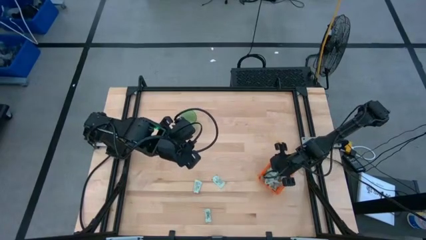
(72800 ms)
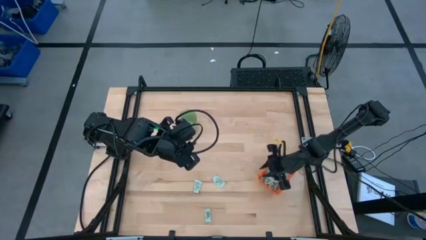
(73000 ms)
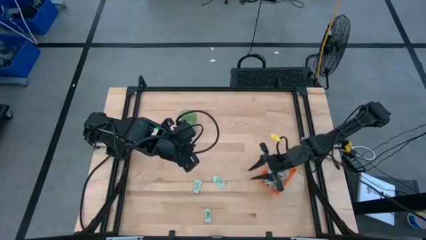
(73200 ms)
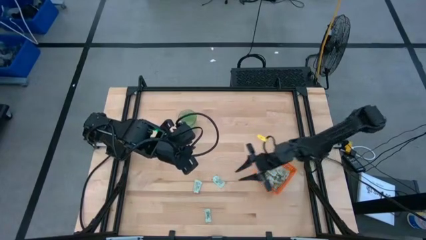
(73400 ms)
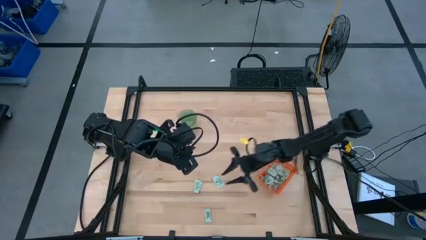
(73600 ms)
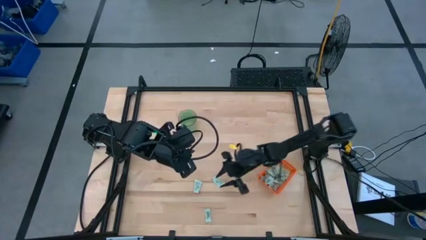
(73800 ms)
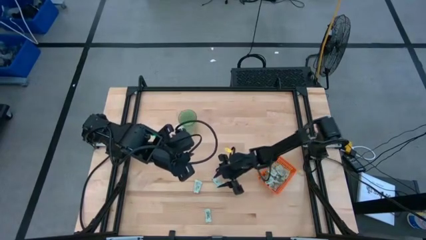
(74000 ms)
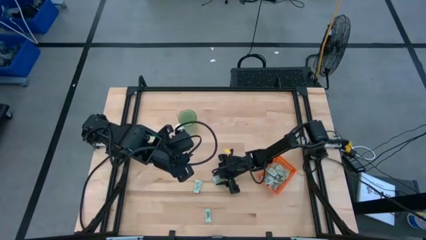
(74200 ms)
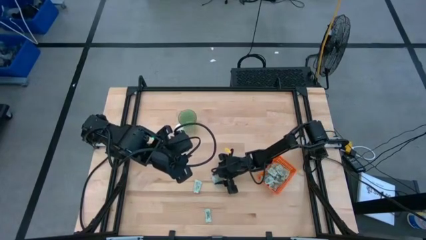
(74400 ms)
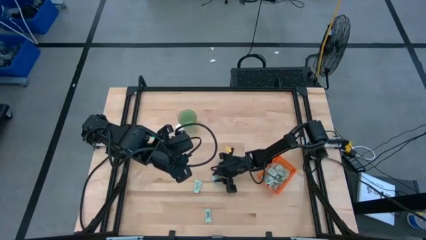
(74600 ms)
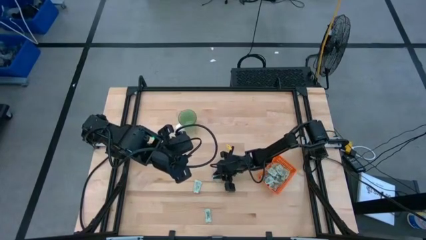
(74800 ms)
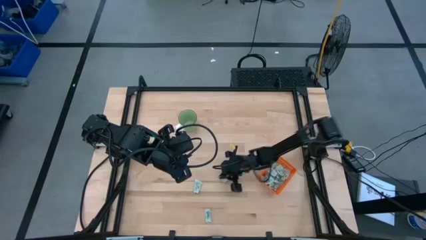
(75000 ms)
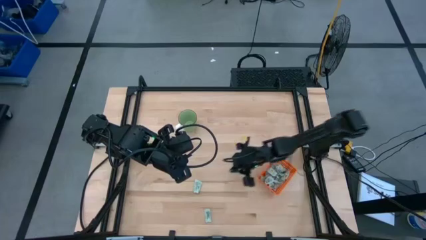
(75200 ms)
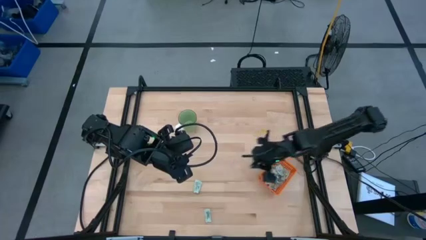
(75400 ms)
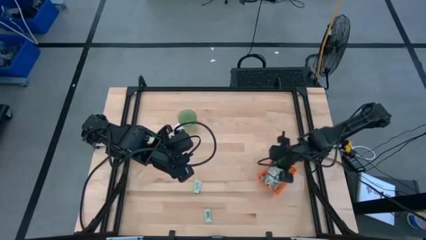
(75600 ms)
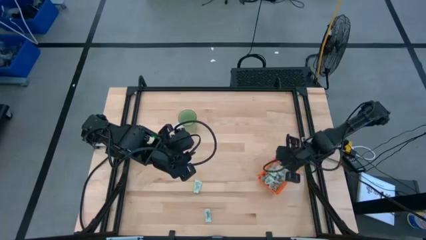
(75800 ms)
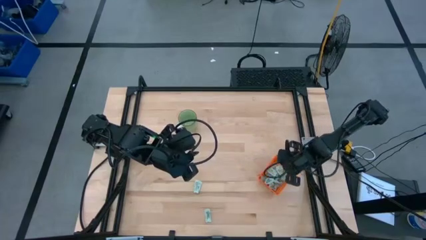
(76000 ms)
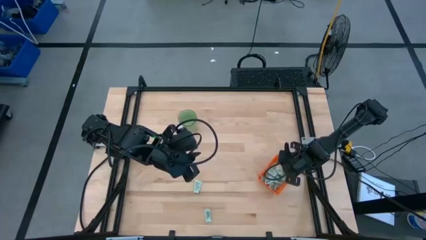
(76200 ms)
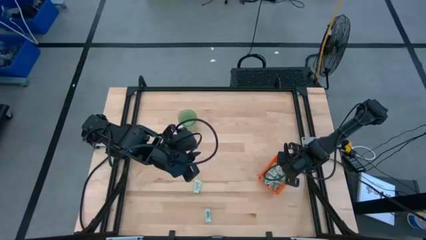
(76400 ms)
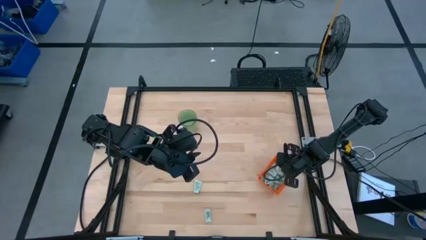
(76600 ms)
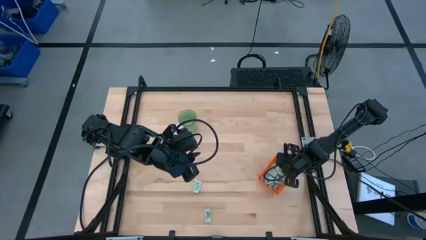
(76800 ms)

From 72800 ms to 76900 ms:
Task: Pick and place Stevia / Truvia into bins
Put the stevia packet into the orange basket

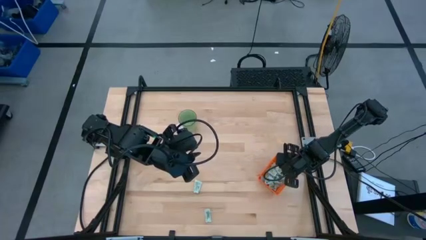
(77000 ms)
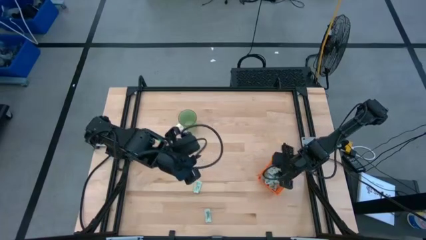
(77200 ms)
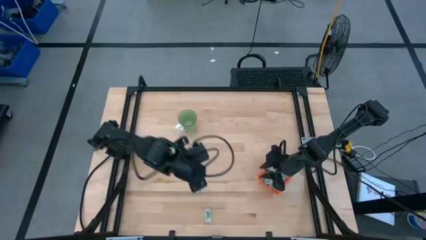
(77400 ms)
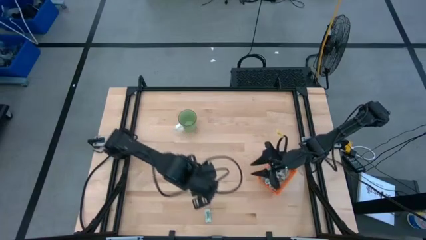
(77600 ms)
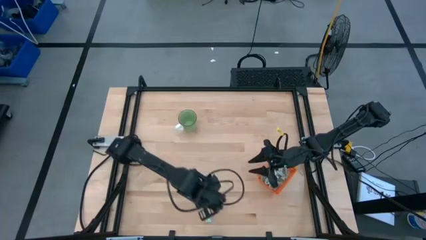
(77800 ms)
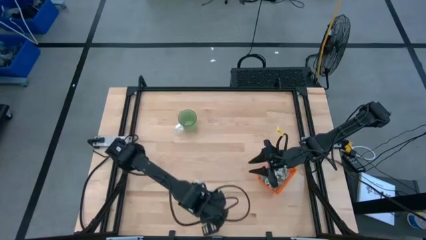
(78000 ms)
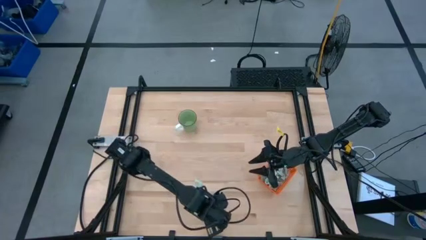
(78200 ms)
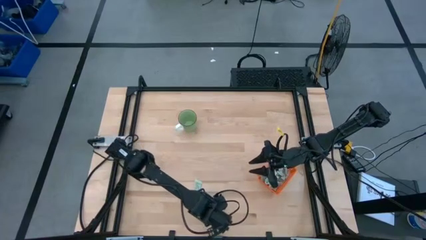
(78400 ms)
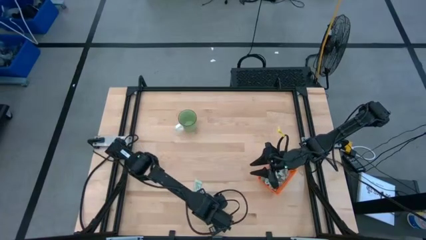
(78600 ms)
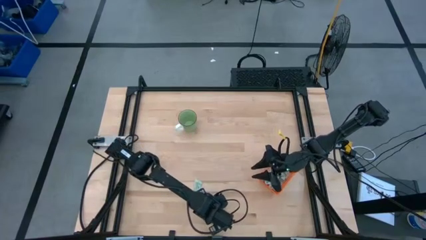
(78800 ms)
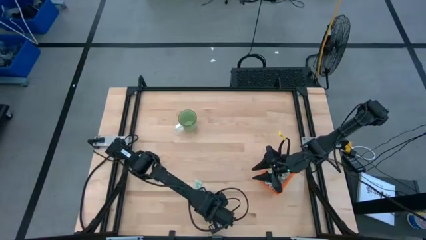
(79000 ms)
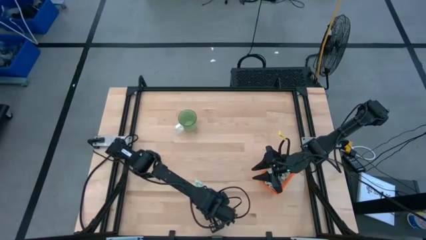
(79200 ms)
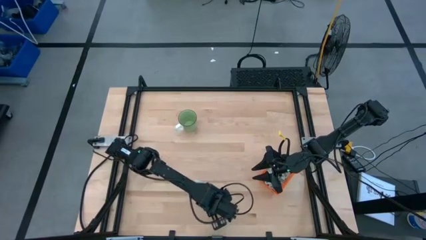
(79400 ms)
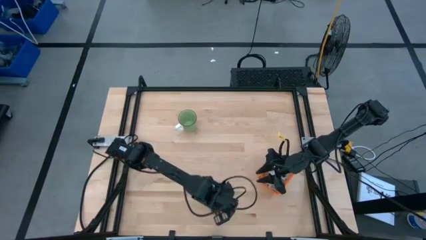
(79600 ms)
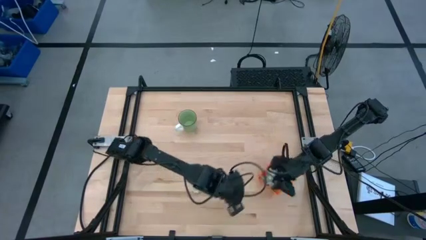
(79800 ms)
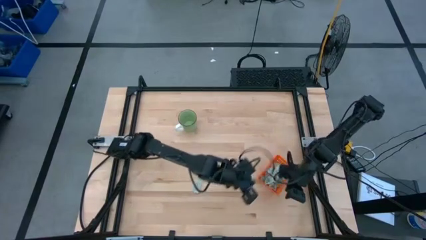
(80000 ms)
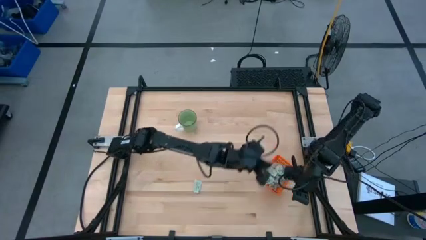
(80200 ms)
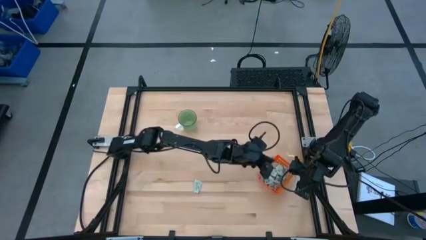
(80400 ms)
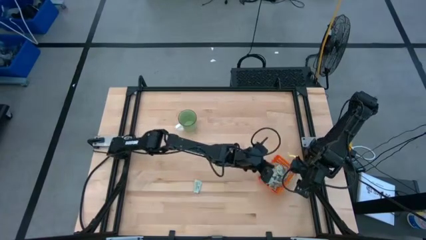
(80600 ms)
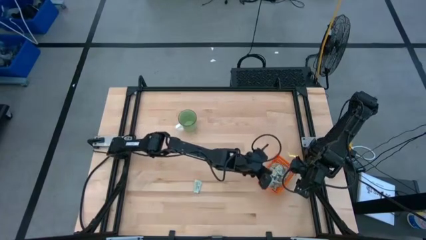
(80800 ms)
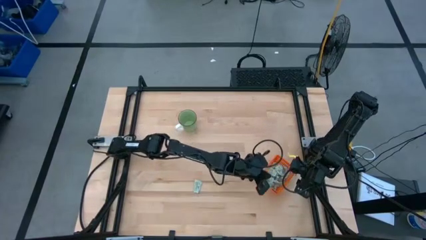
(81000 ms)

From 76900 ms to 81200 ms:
Put the stevia packet into the orange basket

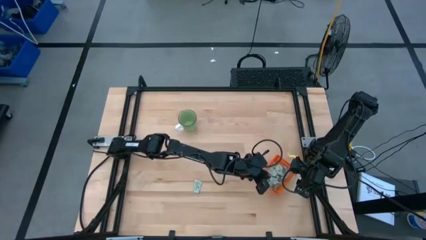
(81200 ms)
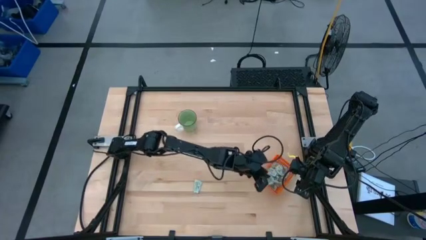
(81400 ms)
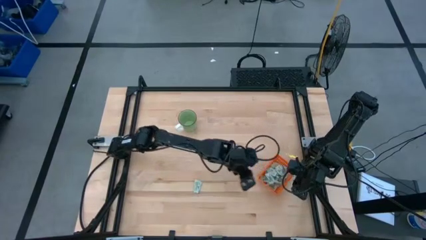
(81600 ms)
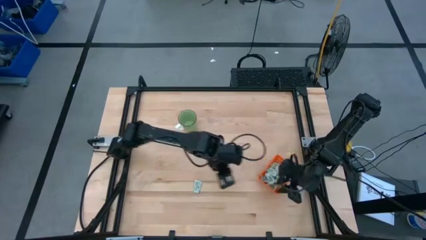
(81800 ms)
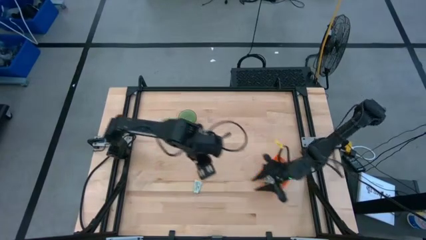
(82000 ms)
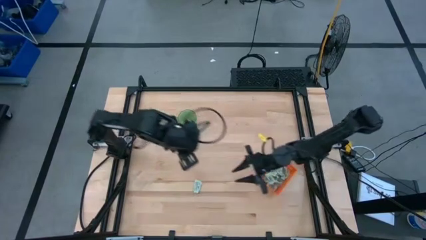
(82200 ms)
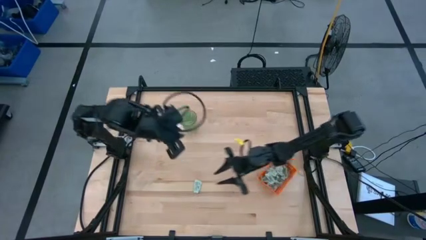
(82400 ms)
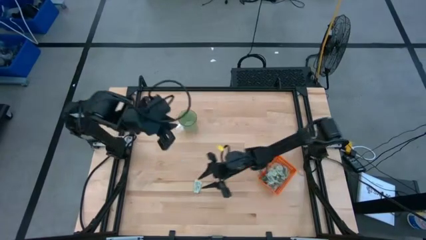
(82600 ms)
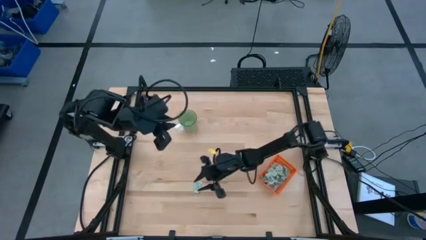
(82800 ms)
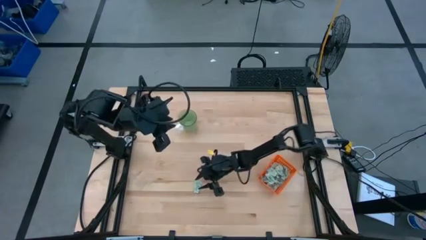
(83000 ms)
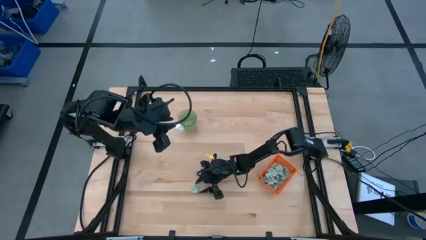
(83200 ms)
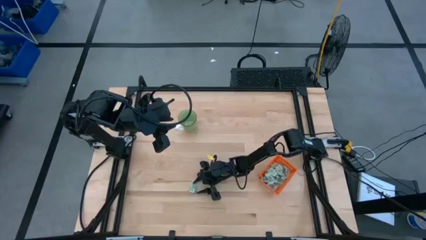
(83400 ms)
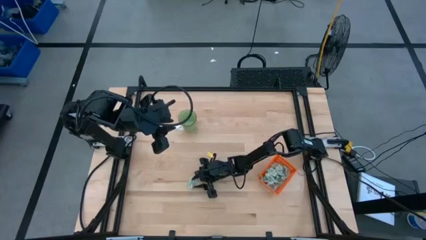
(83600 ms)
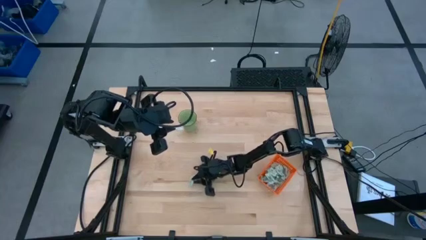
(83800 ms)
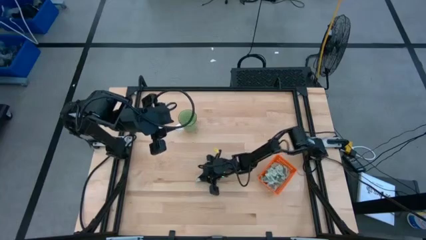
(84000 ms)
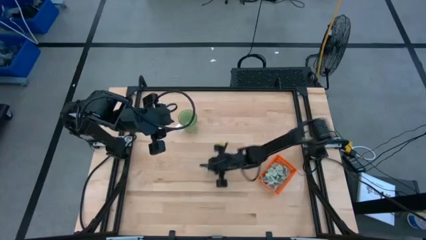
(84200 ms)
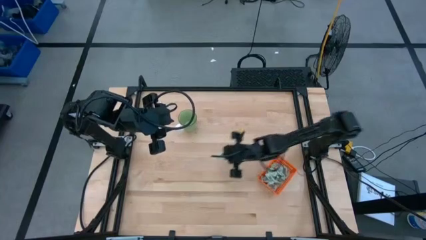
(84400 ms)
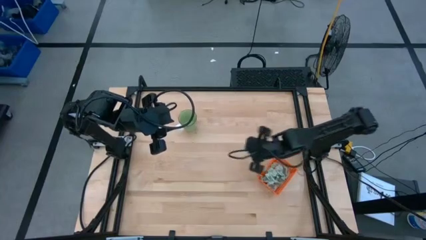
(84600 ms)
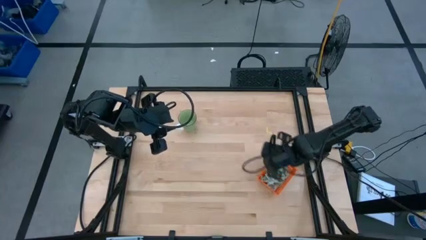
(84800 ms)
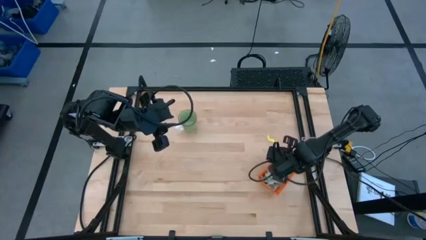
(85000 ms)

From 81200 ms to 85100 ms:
Put the stevia packet into the orange basket

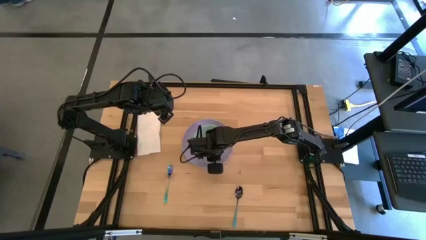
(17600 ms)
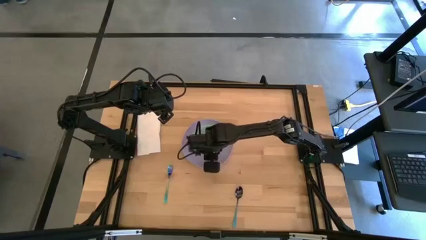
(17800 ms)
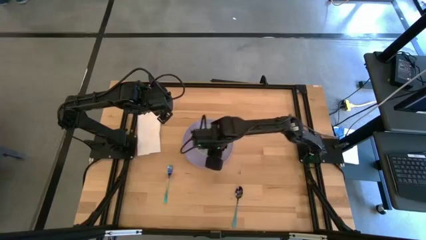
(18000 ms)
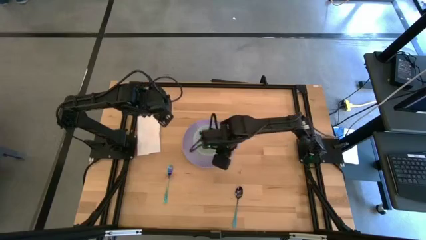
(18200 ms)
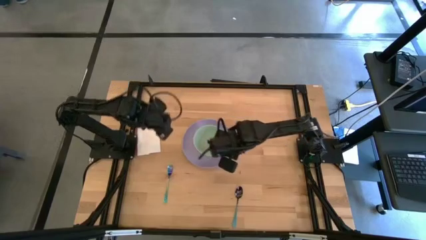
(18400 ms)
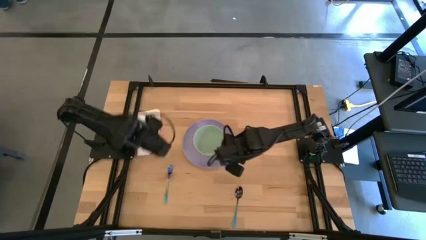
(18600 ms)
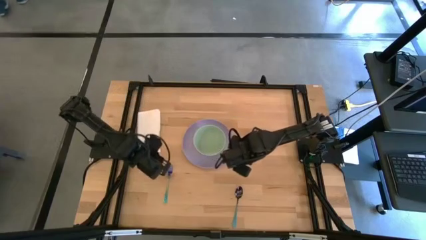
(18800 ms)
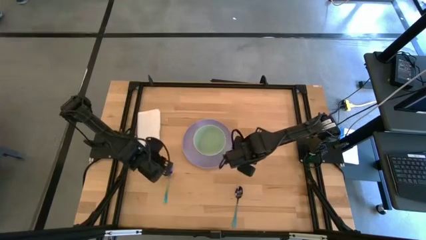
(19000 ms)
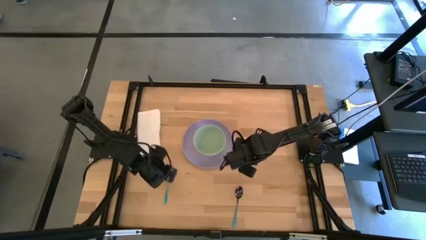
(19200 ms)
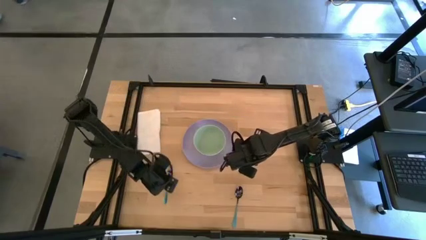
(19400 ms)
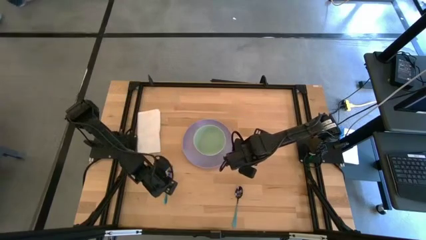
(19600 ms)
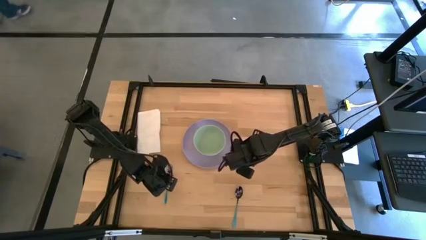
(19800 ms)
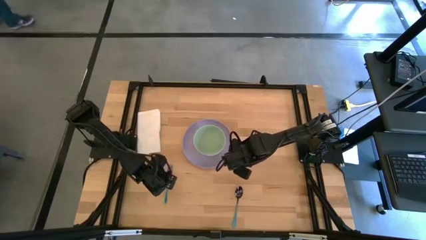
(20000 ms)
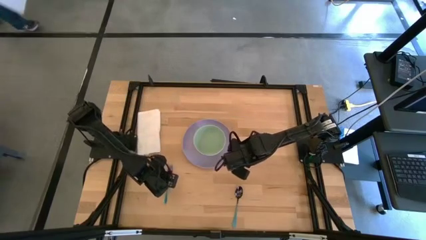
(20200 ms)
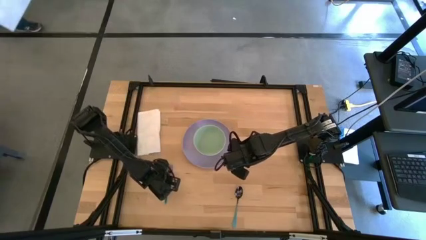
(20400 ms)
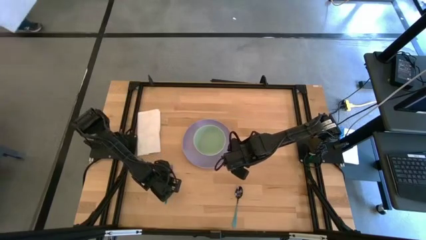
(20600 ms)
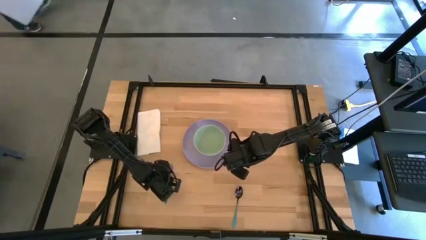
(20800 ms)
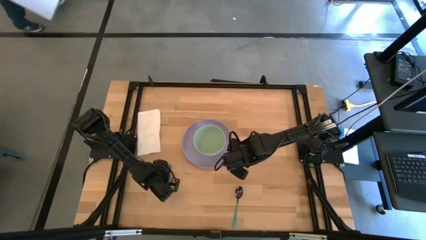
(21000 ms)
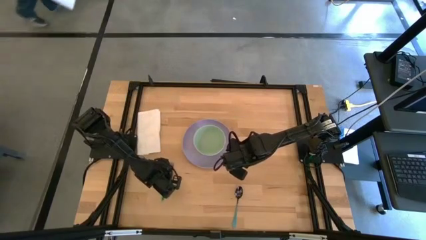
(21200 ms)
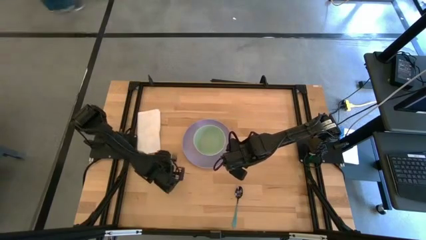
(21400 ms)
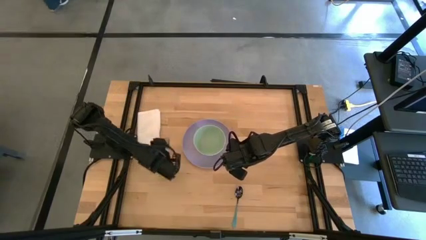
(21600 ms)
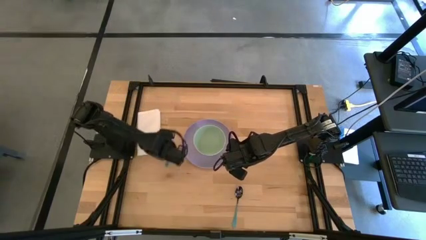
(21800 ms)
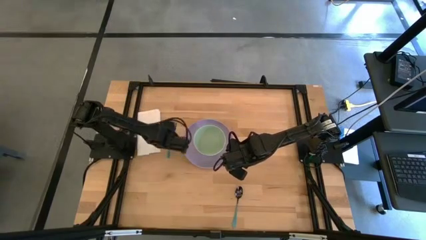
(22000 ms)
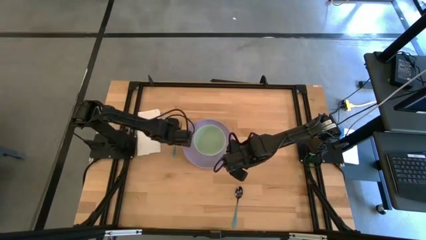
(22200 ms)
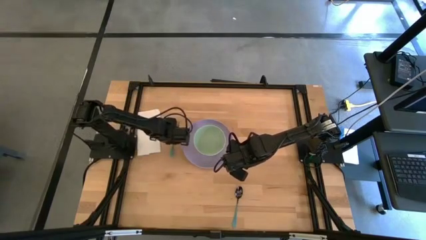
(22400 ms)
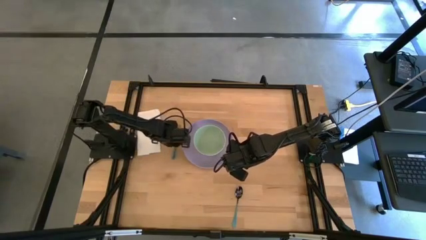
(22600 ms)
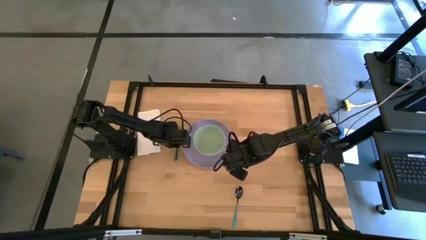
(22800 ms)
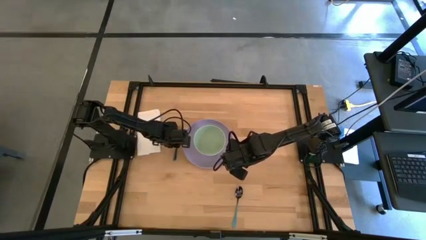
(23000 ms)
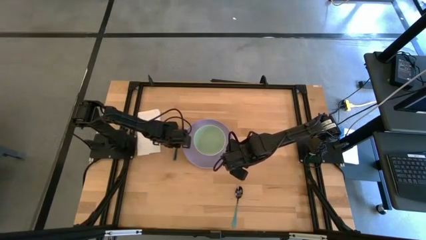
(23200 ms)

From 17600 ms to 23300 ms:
Task: Set table place
Move the fork to the left side of the purple plate
